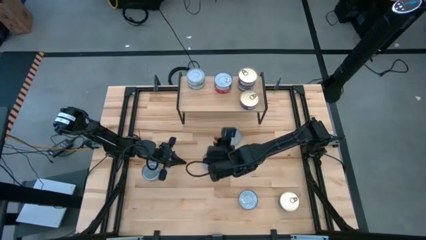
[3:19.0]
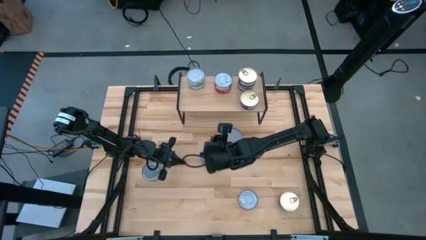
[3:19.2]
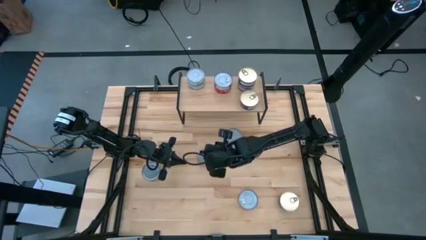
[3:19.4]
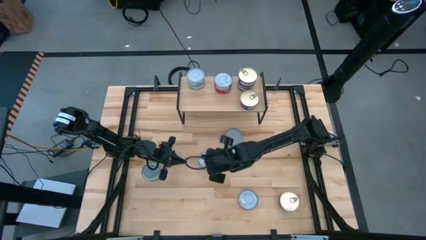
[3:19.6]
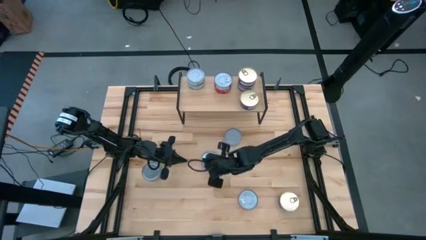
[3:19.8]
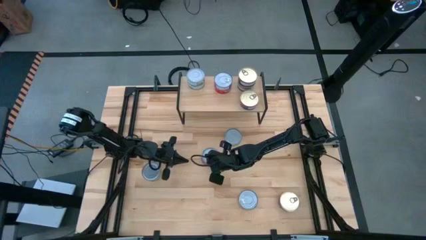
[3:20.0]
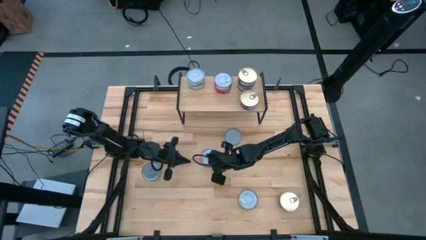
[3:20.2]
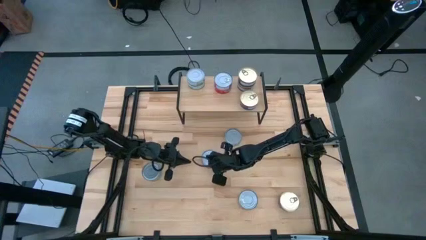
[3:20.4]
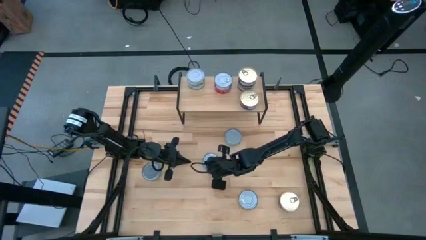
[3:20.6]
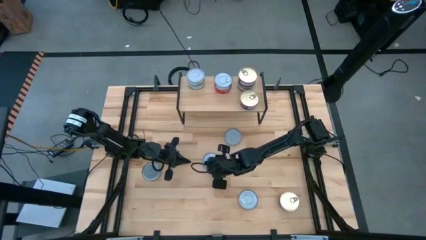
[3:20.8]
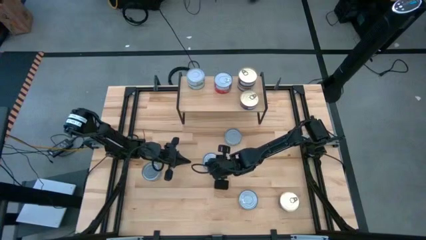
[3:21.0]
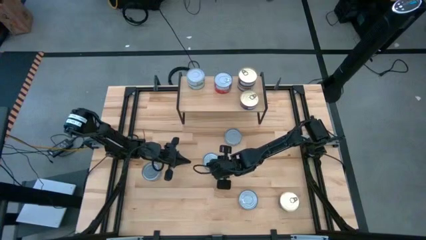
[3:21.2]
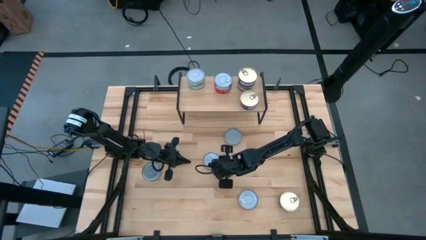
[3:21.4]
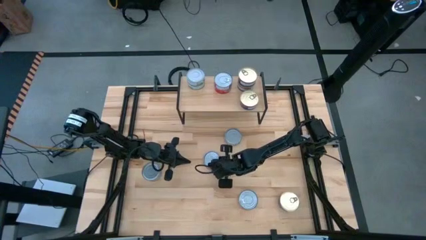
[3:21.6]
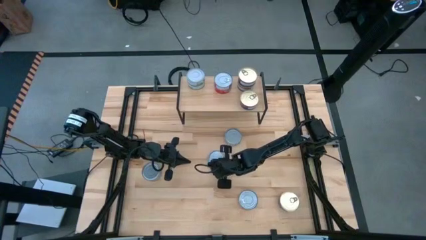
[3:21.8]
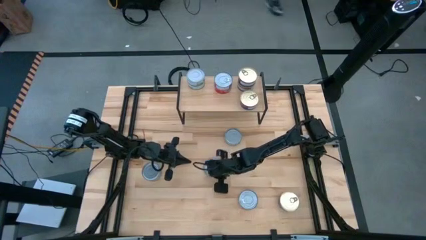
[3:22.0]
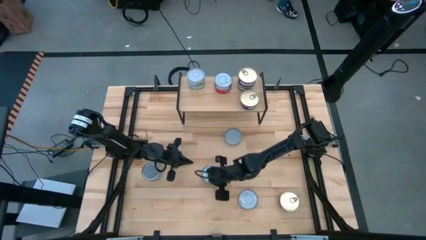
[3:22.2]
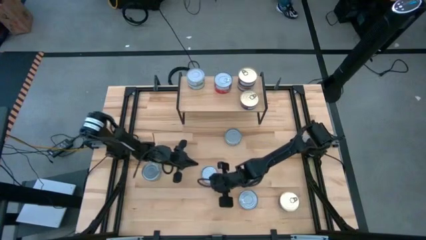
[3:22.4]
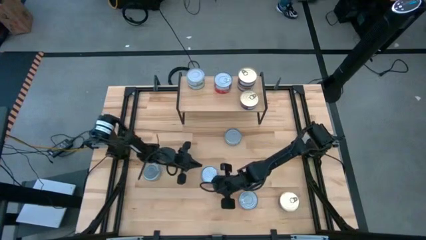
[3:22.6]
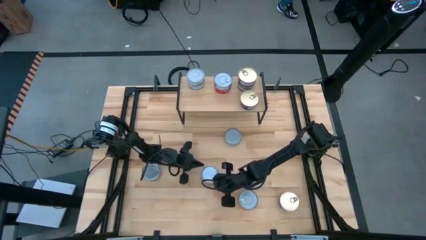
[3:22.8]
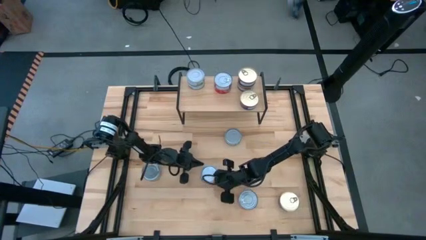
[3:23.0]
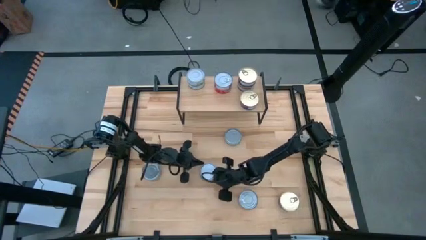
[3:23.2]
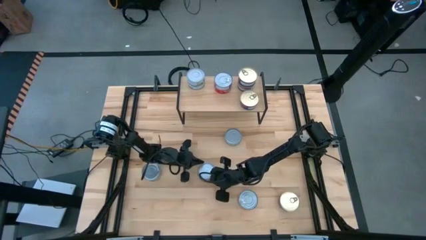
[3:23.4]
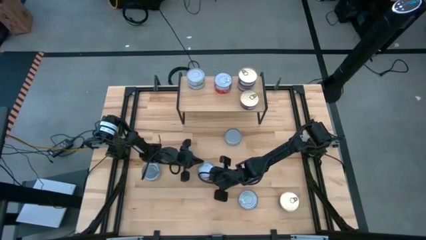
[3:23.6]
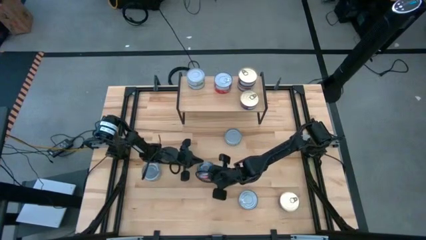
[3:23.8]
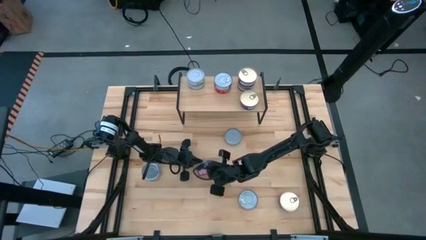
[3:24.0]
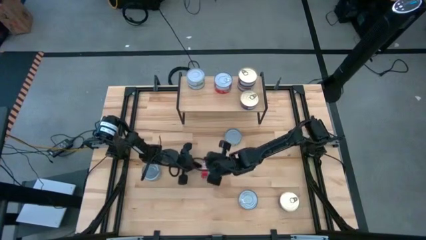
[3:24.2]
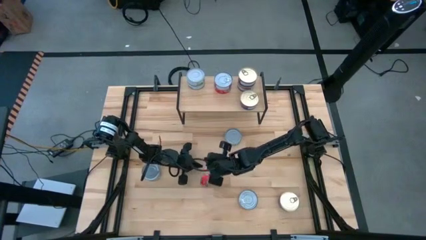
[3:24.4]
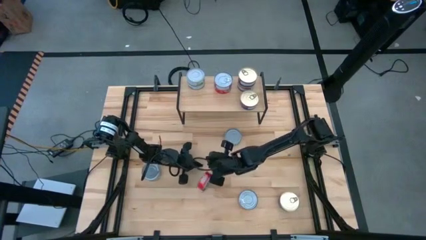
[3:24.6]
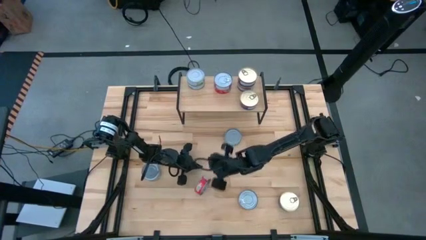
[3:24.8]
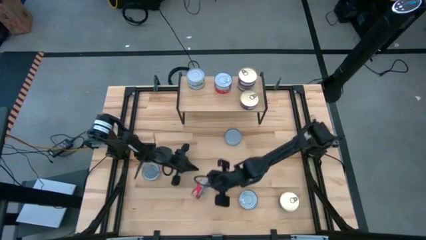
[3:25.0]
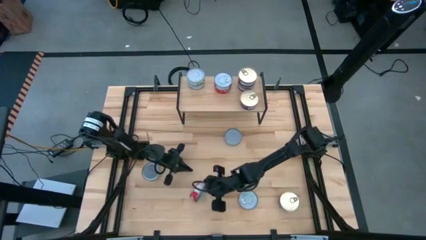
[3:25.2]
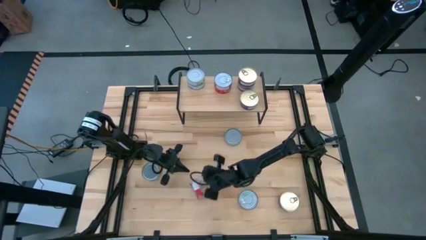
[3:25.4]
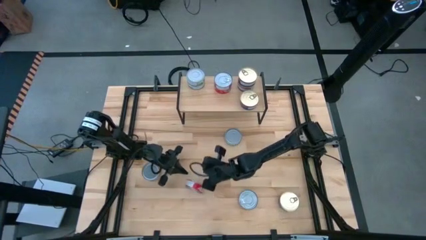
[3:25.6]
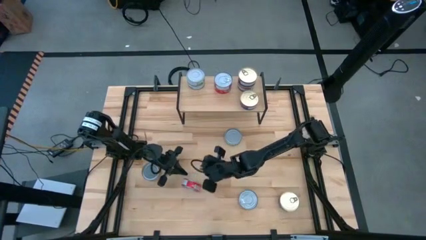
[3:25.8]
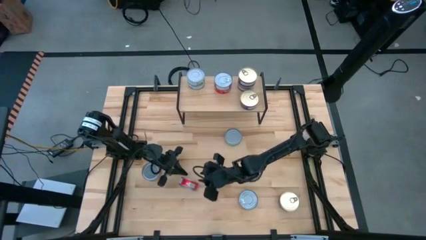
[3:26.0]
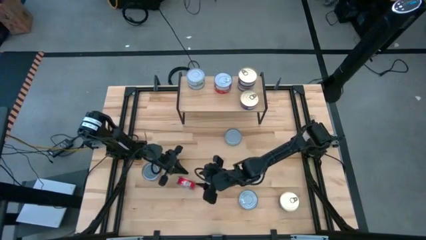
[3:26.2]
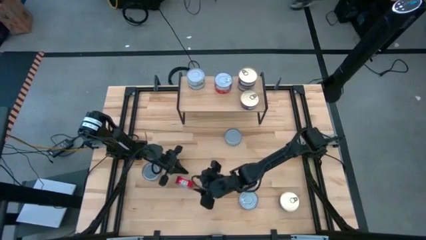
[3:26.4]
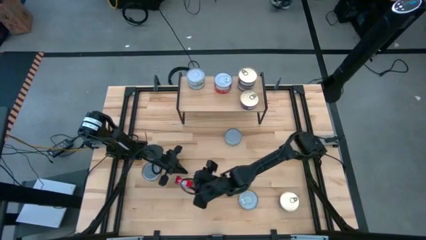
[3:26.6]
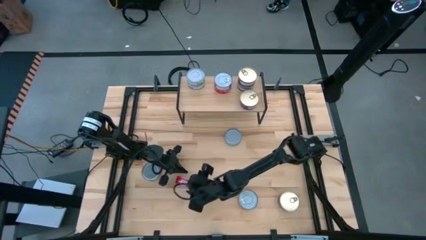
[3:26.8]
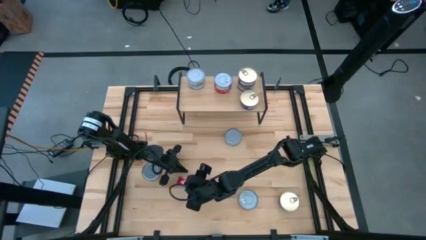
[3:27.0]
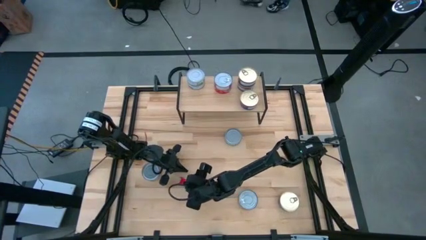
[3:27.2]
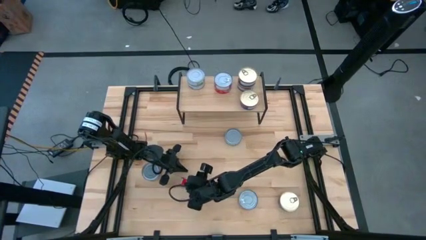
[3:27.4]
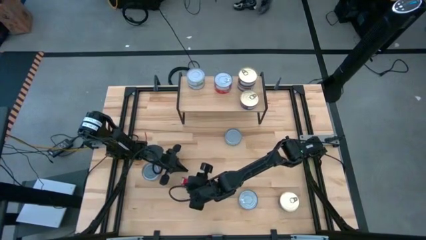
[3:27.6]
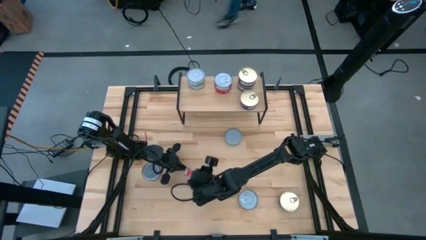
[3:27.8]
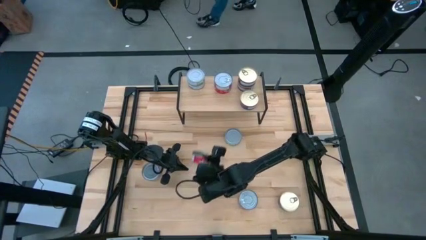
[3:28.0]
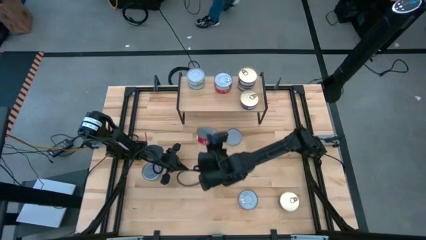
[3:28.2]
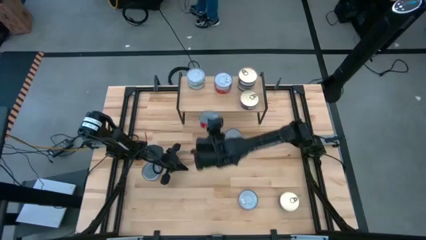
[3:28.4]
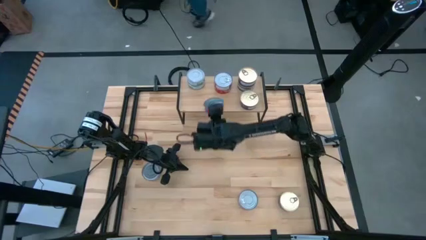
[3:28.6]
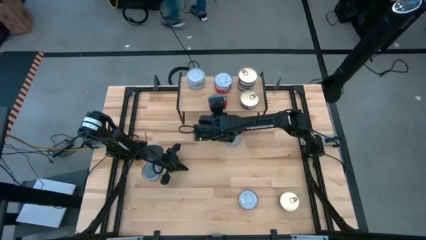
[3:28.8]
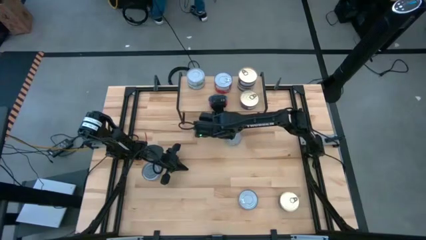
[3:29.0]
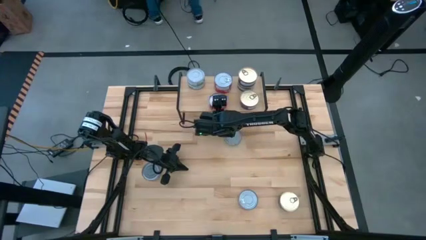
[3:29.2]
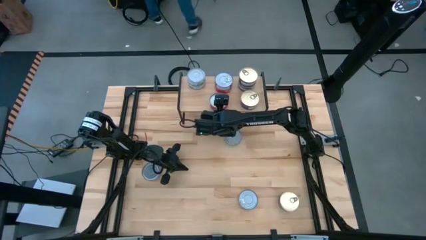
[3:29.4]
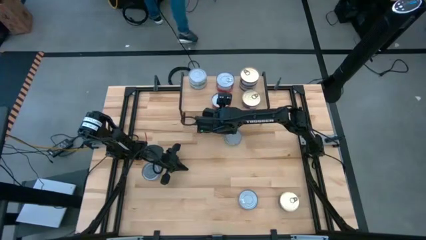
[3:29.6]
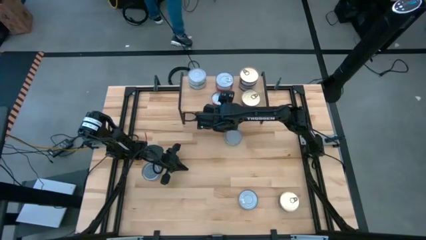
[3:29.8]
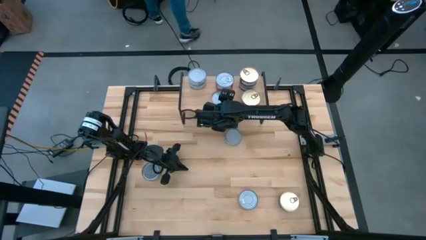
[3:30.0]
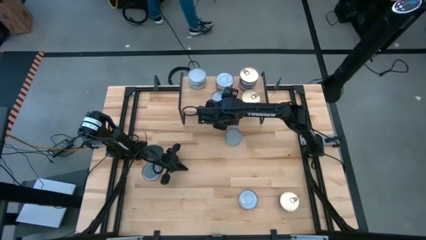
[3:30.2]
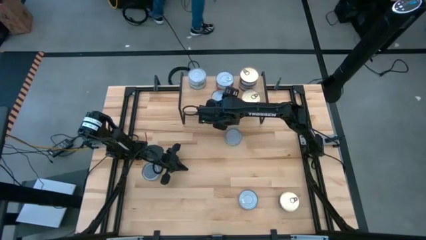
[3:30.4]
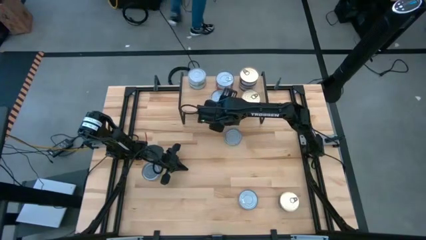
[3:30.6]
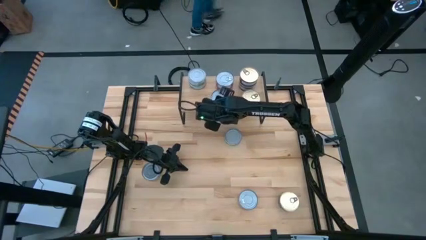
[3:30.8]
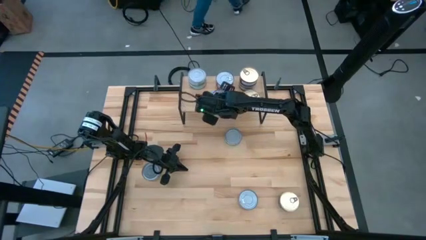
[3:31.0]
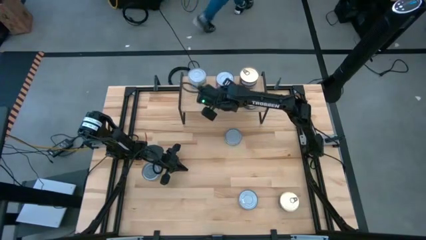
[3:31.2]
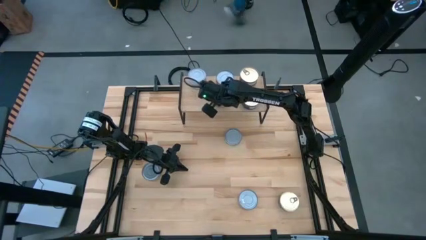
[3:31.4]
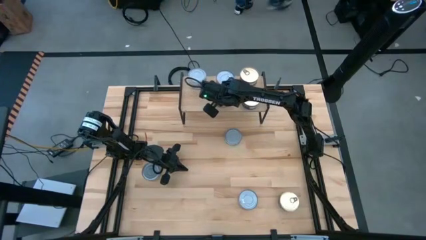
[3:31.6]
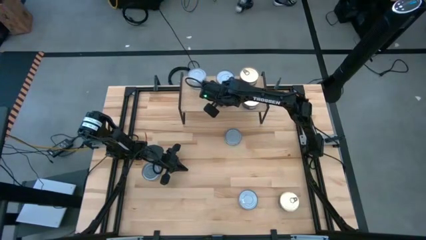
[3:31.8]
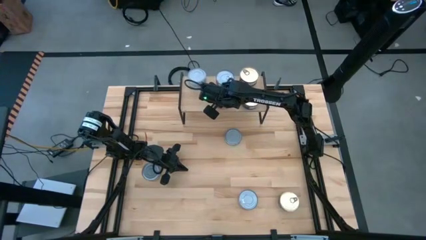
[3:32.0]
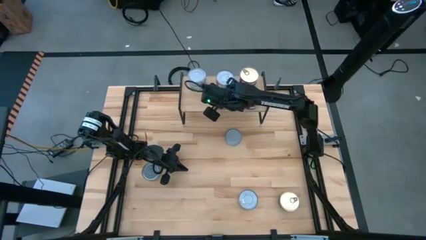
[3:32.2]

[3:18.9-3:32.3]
Task: Stack canned seafood by type on shelf
Put the red tuna can on the shelf aligned with the red tuna cans

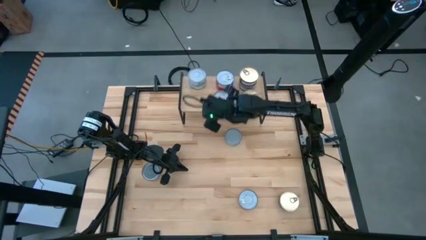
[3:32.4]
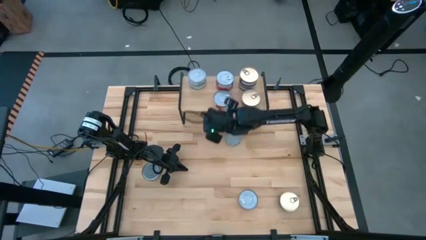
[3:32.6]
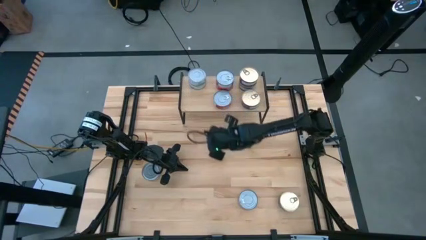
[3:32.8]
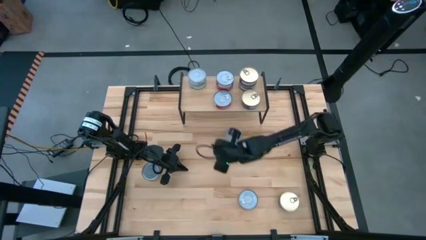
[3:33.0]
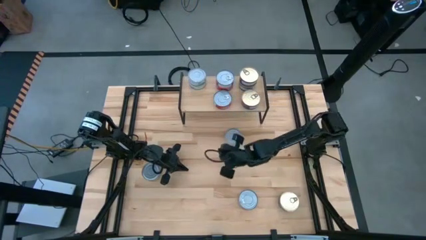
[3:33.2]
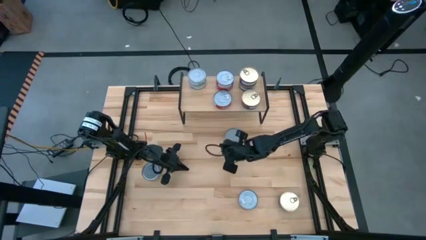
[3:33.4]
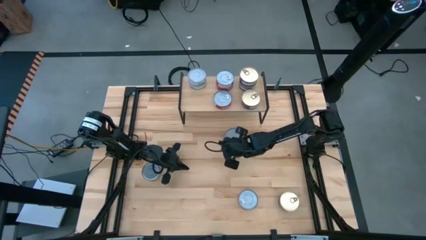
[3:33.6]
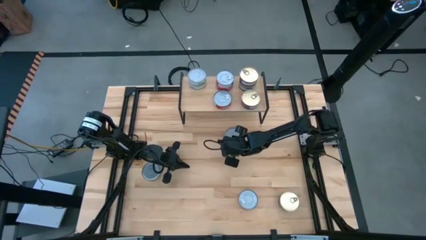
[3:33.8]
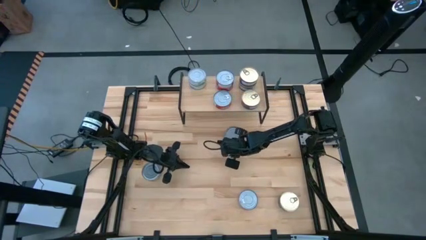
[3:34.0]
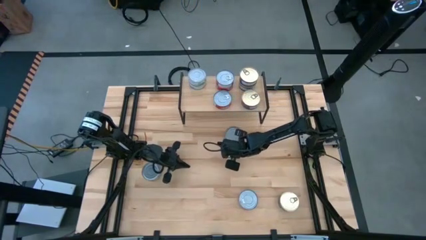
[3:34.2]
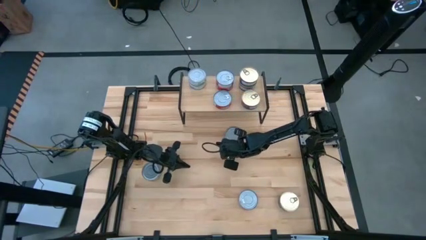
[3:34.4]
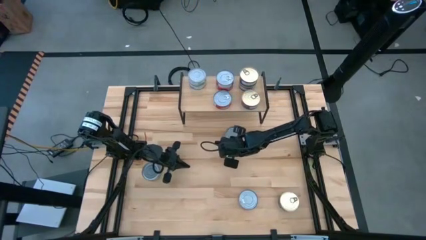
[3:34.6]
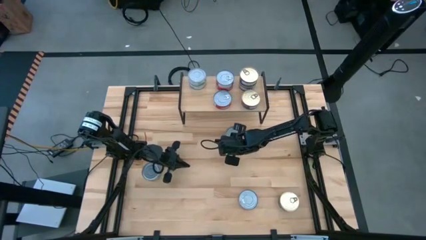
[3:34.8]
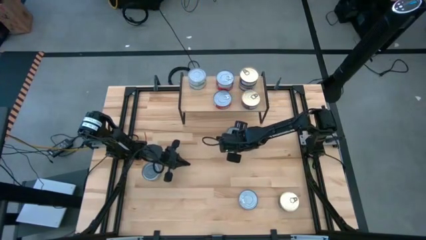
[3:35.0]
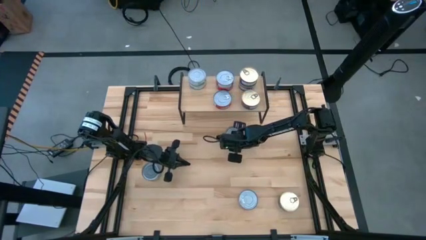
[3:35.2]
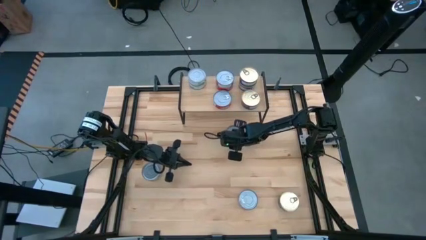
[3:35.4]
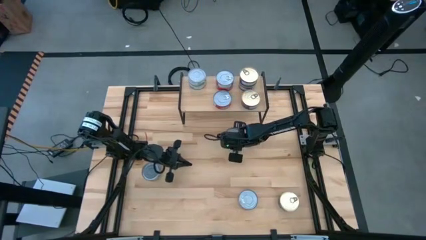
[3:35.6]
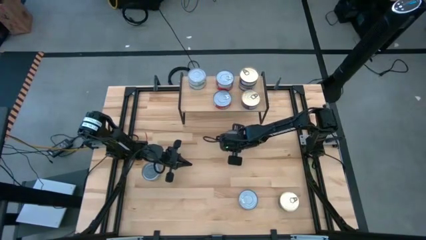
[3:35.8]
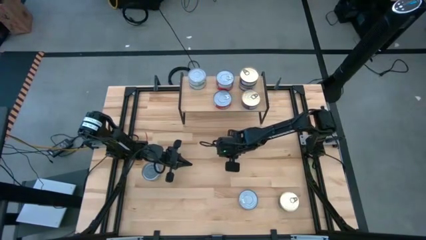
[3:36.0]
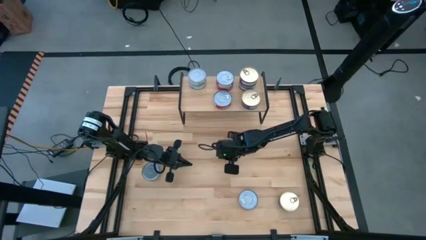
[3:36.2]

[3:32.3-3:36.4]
Put the green and white tuna can on the shelf aligned with the green and white tuna cans
